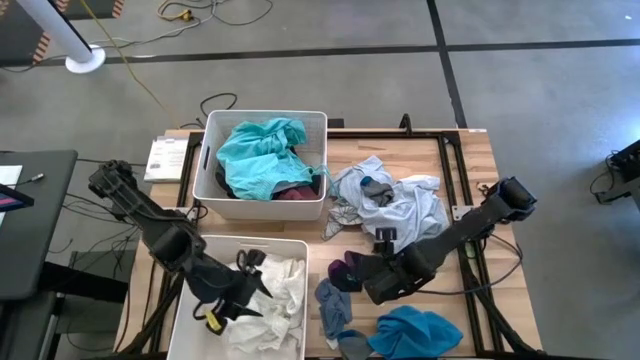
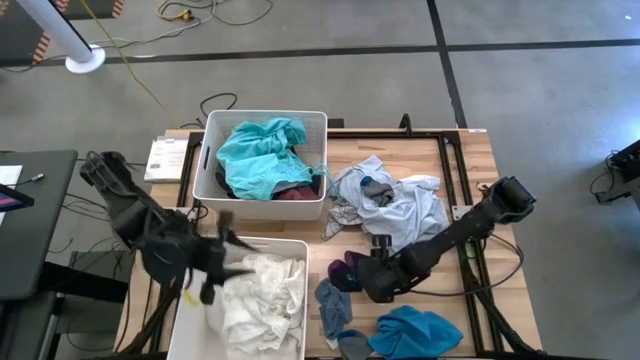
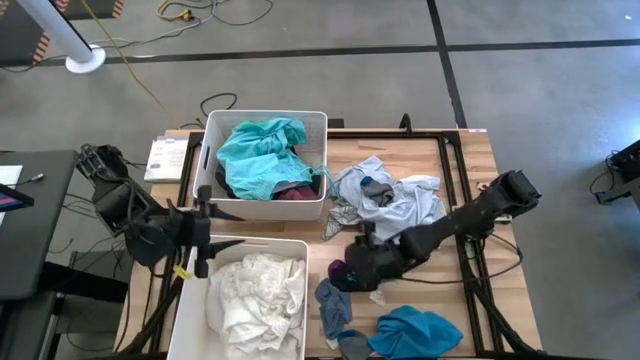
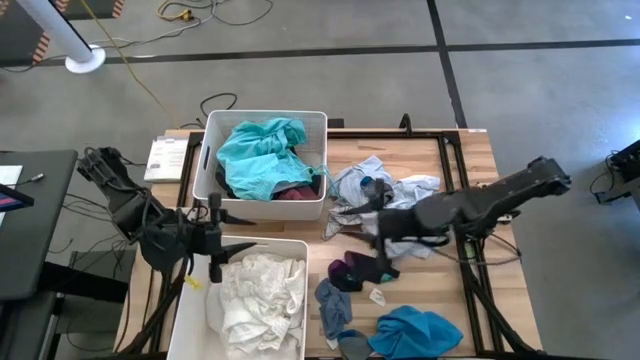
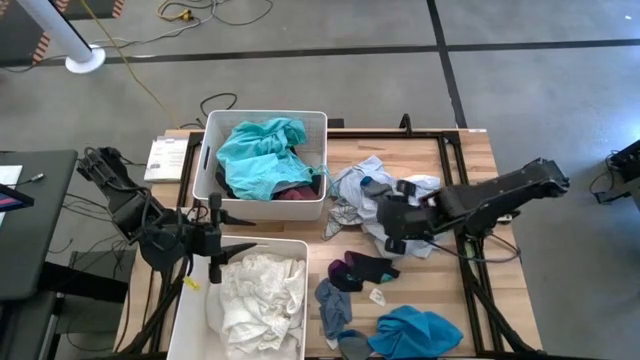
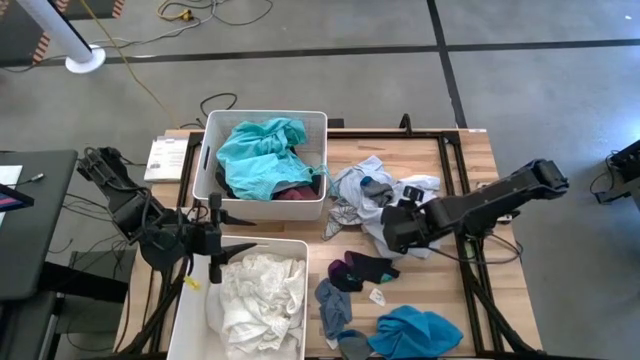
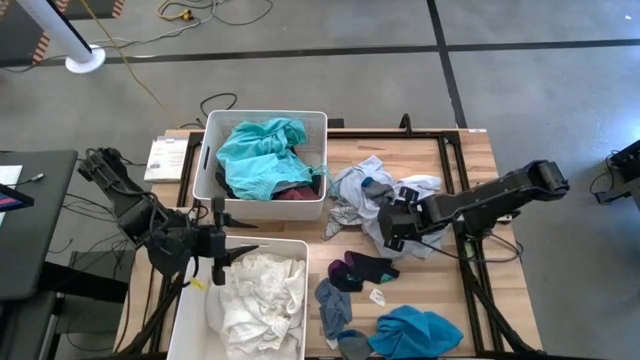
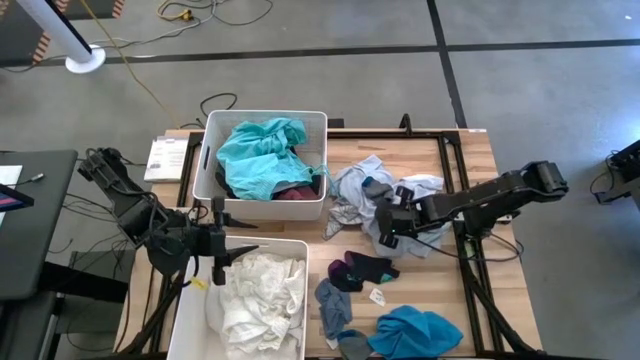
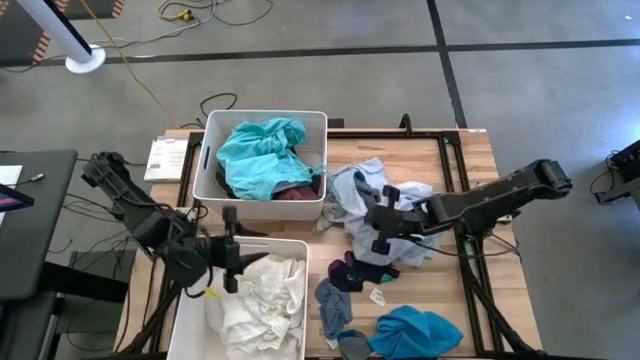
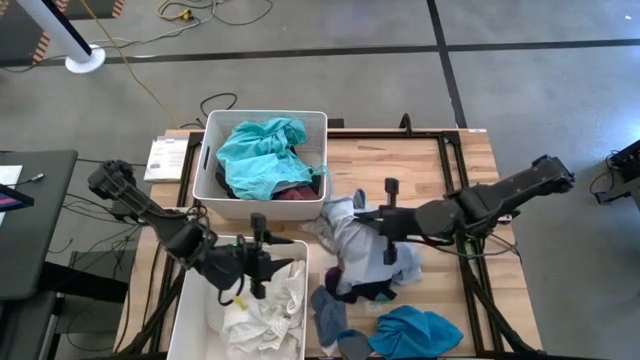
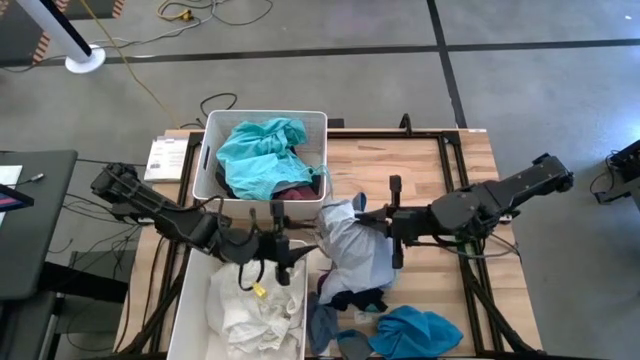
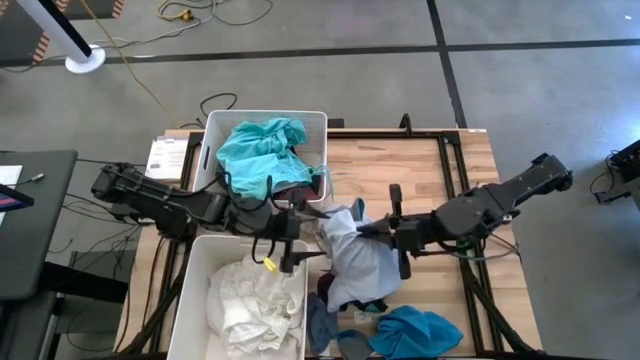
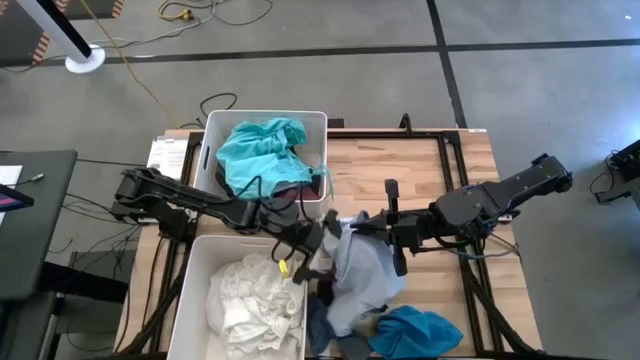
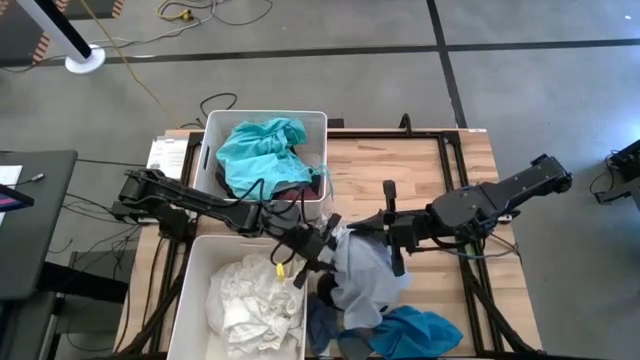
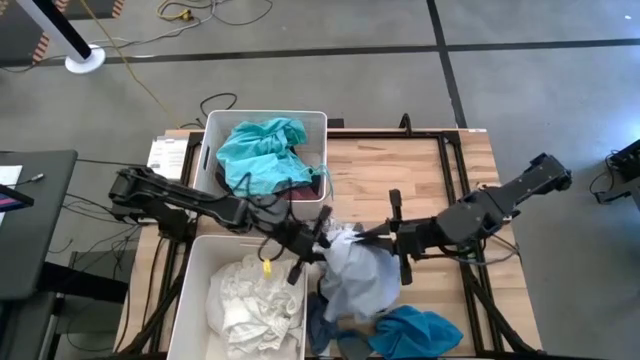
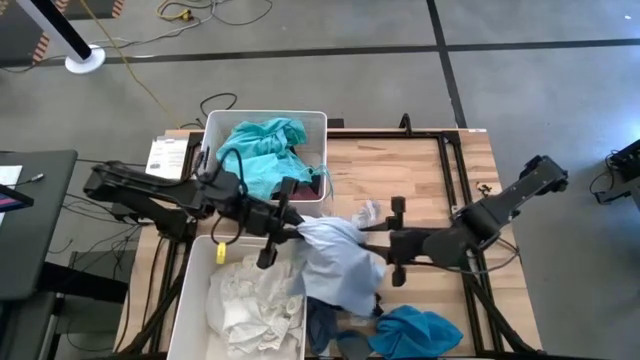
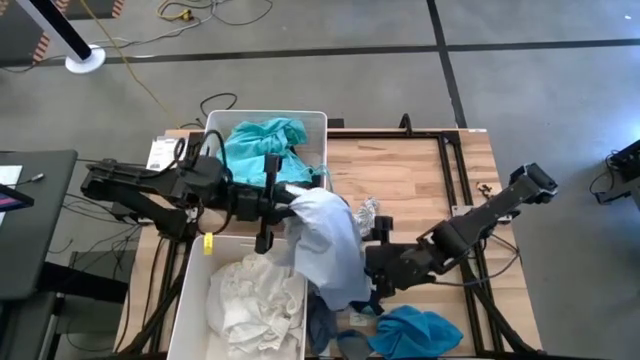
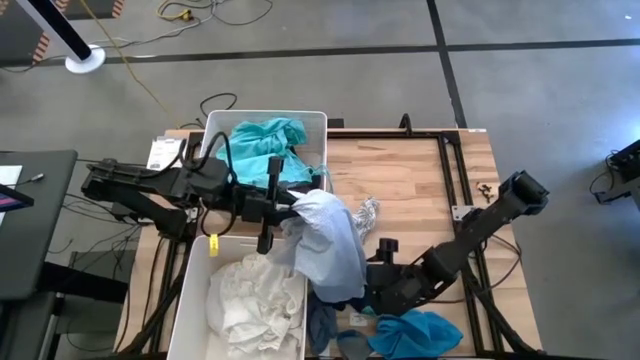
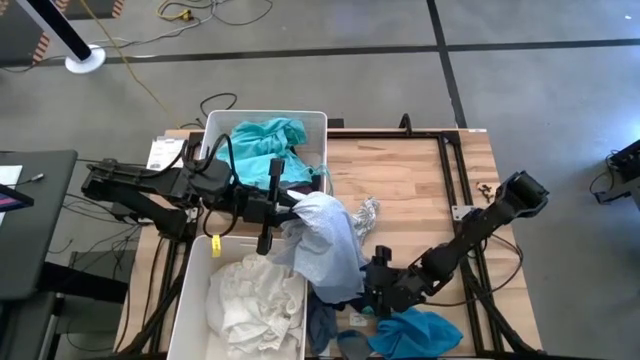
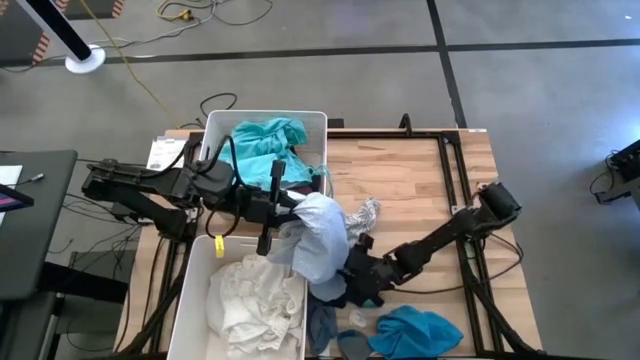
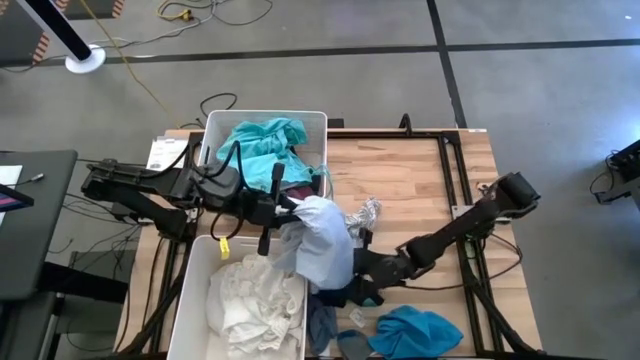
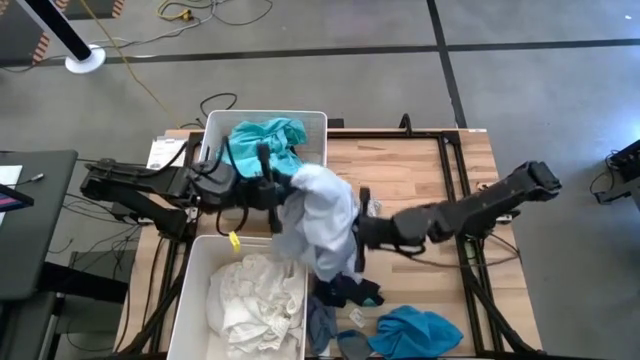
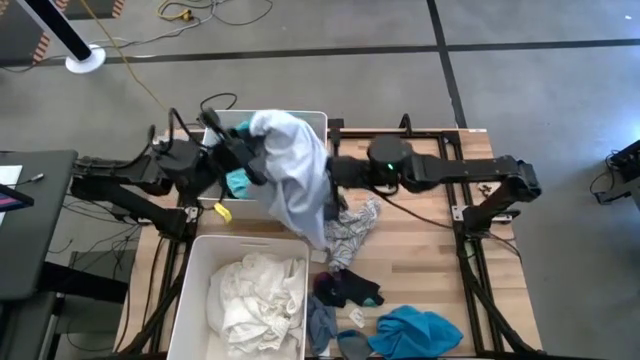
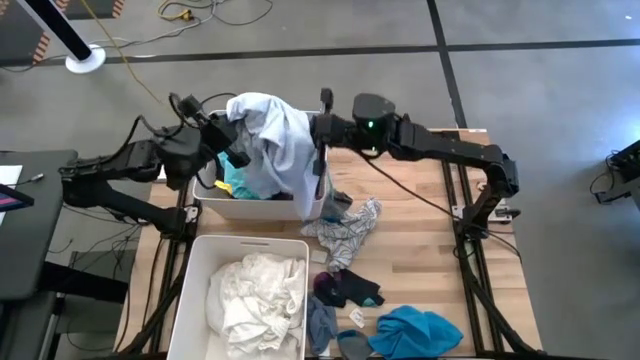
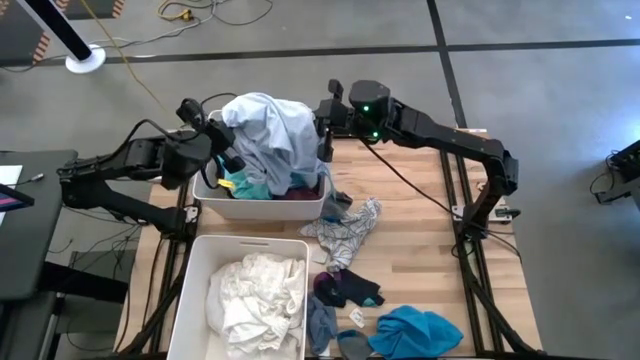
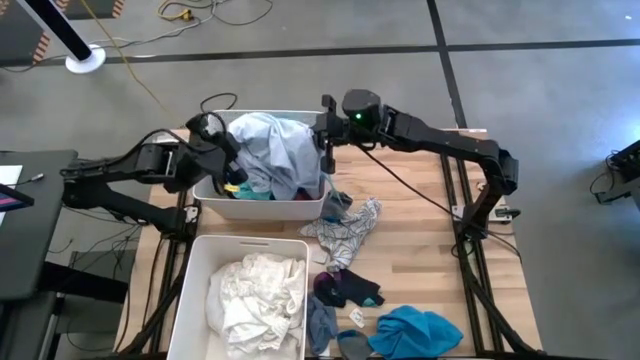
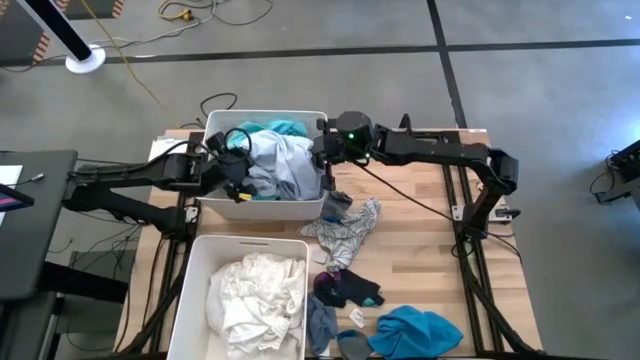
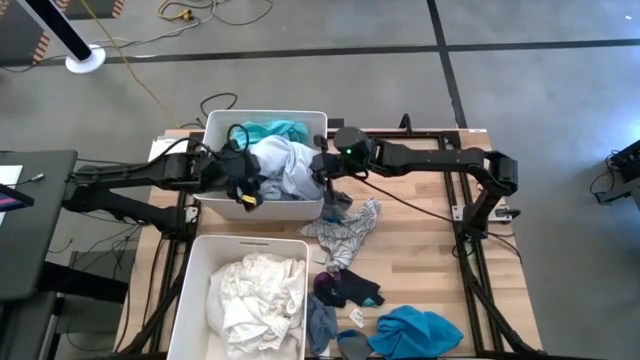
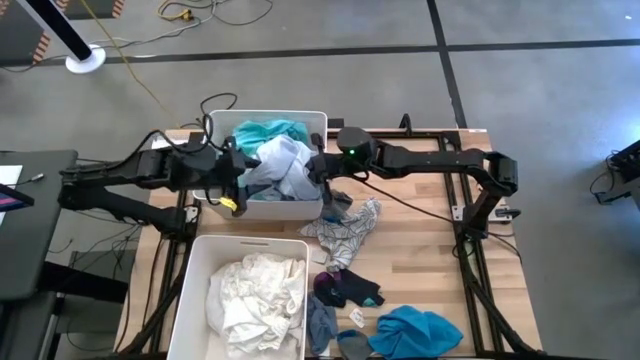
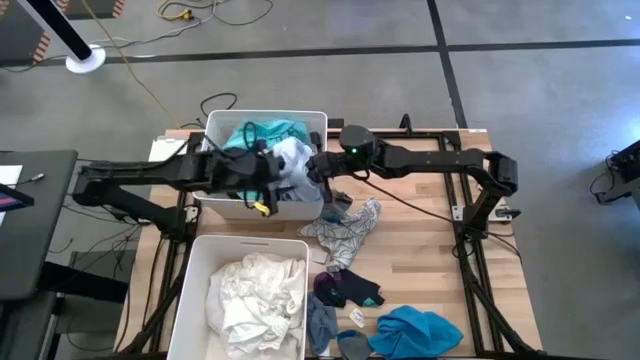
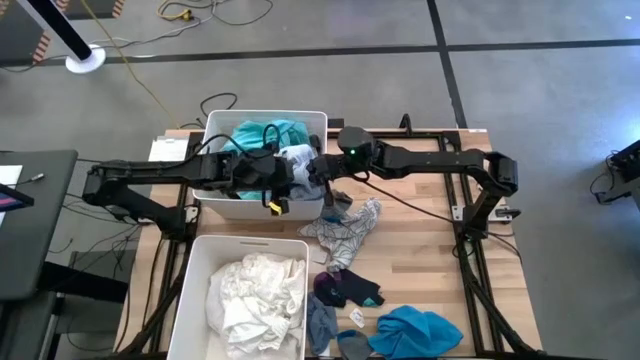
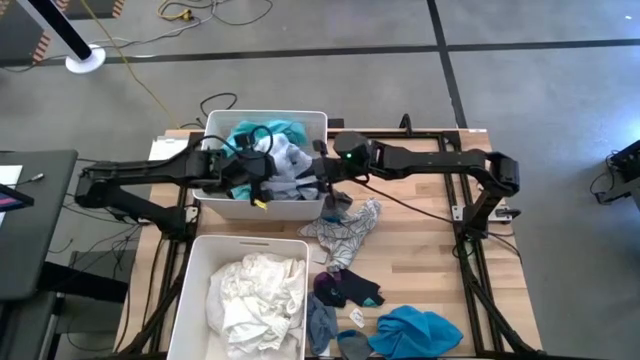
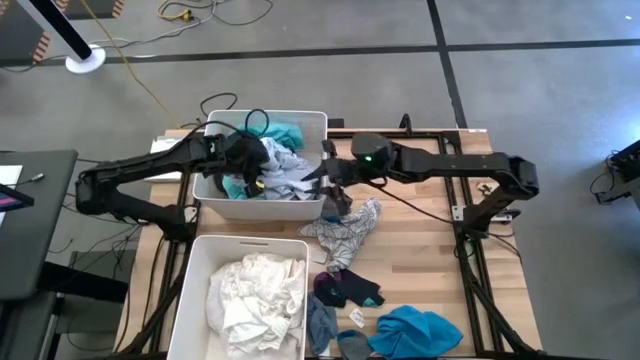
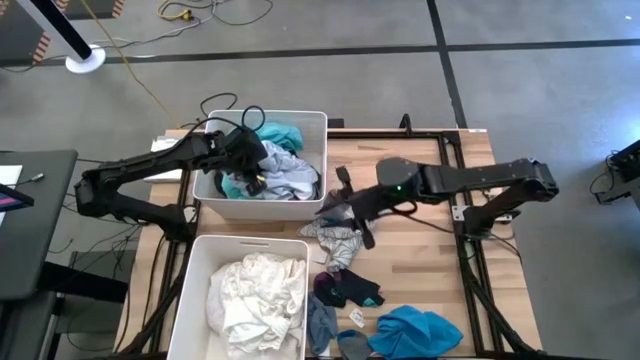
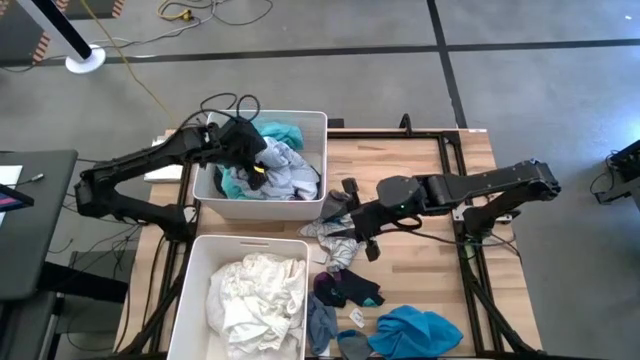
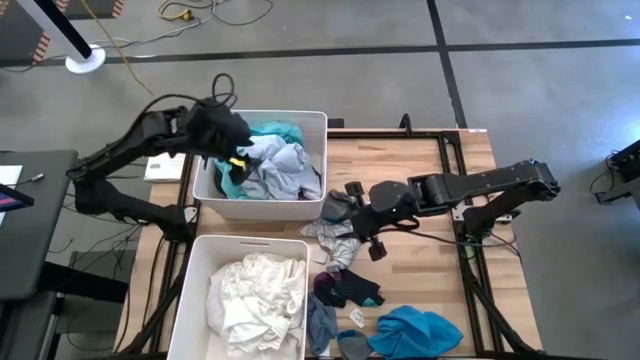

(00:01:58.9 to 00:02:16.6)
Task: Sort clothes
Put the blue patterned shirt into the top white laundry bin

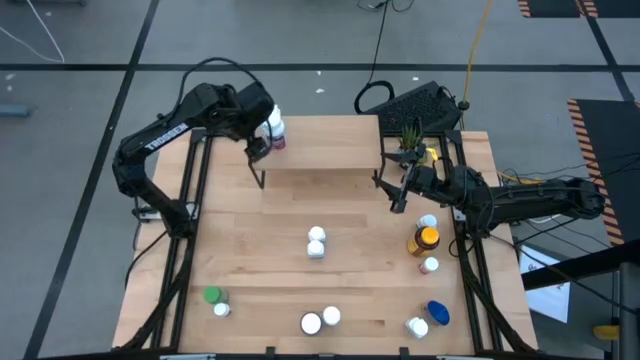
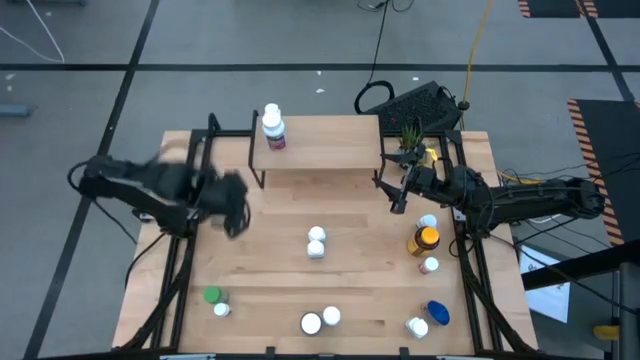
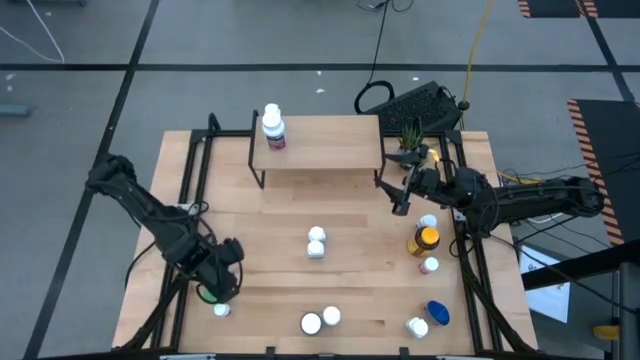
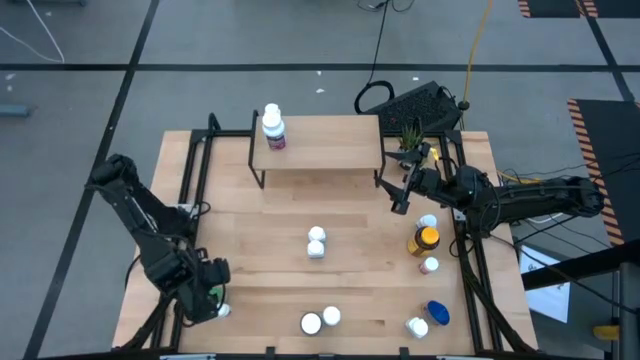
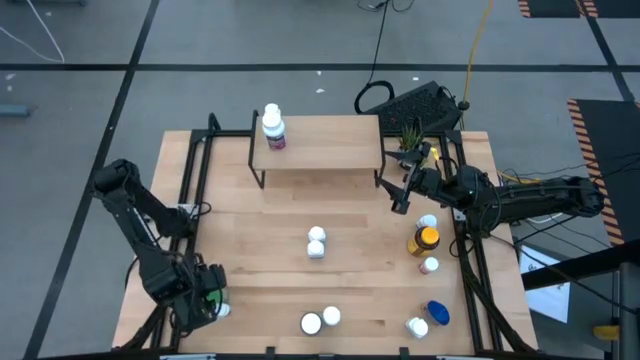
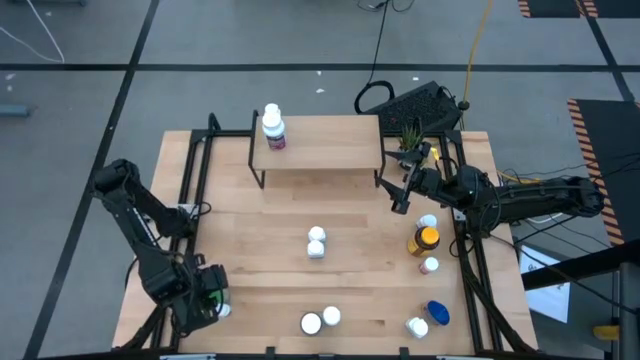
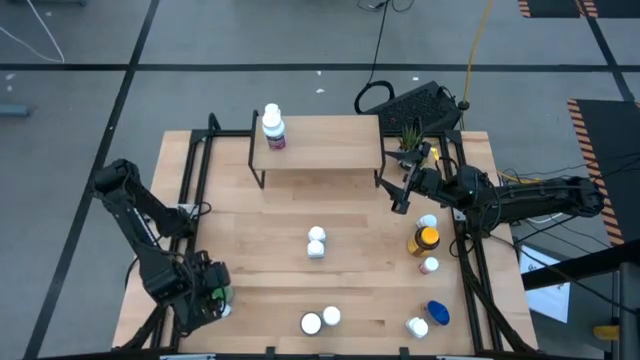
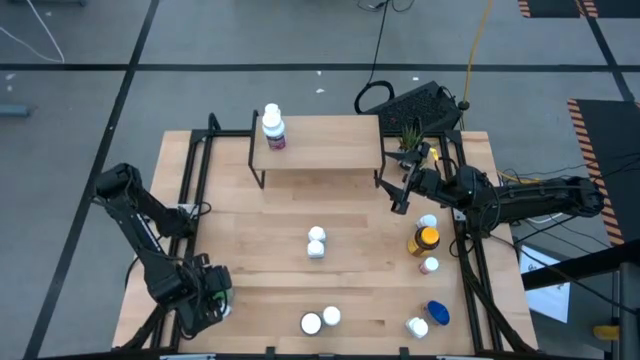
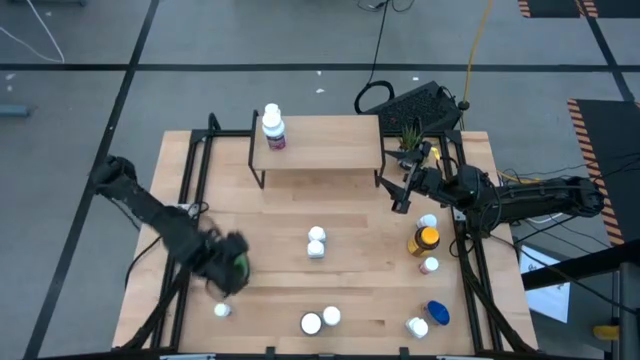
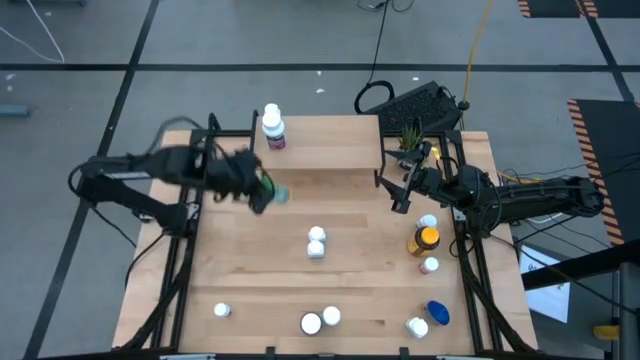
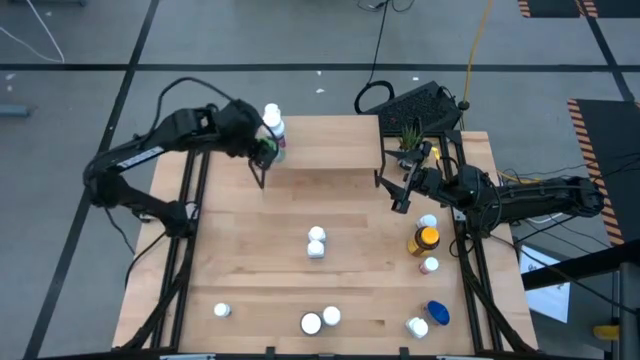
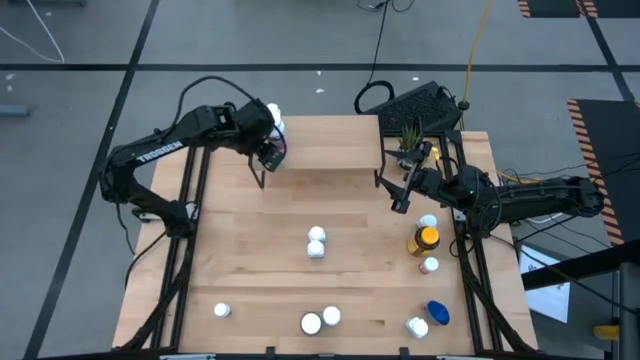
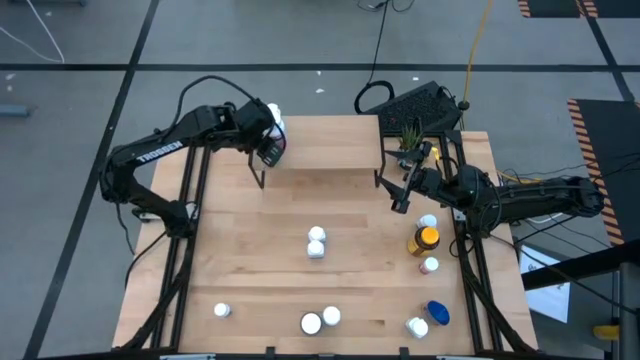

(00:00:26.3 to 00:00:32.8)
Task: Pick and place medicine bottles onto shelf by color
Put the light green pill bottle on the shelf
